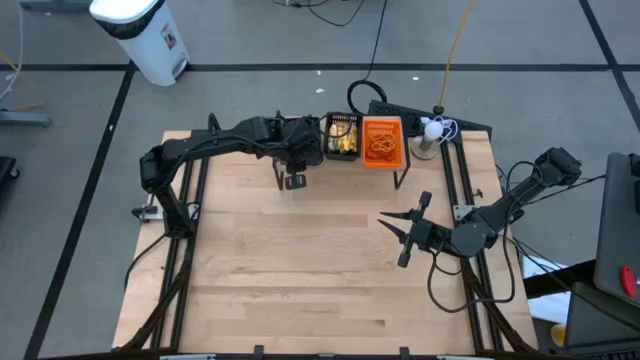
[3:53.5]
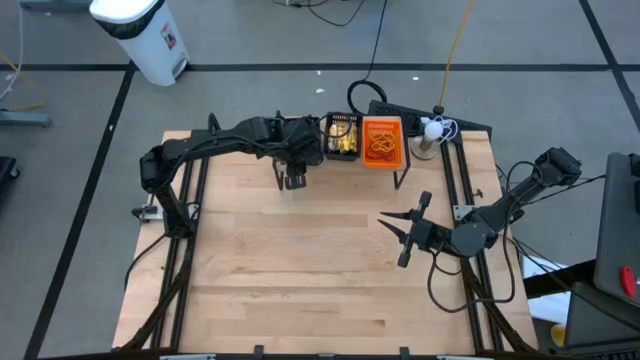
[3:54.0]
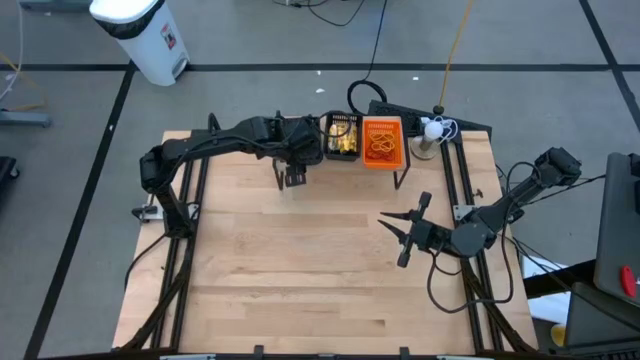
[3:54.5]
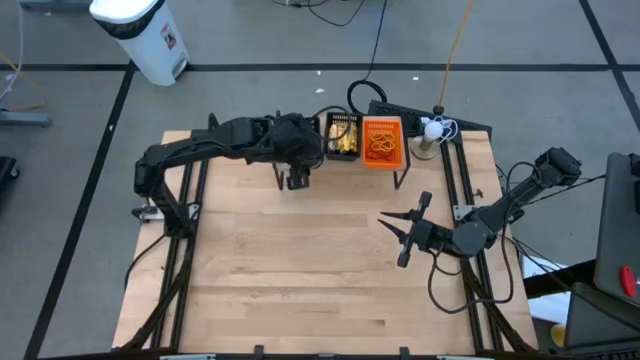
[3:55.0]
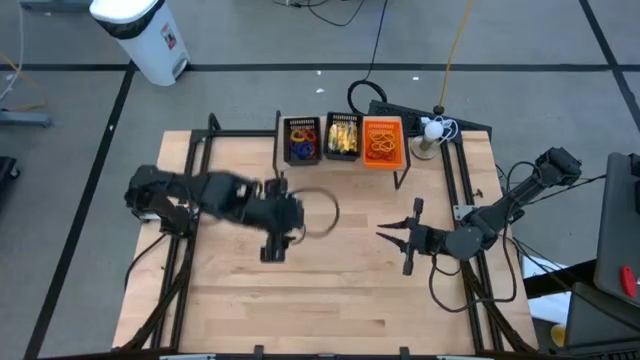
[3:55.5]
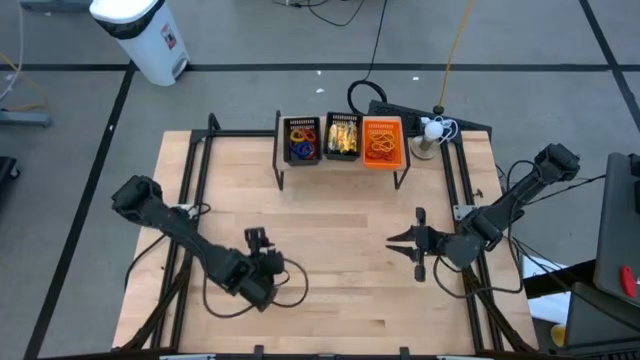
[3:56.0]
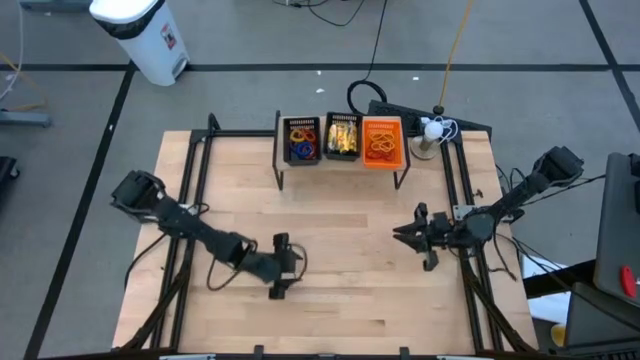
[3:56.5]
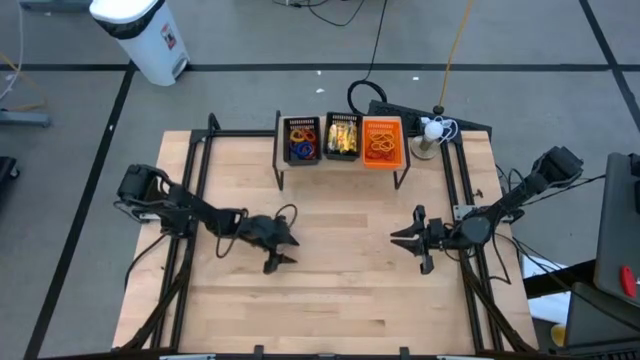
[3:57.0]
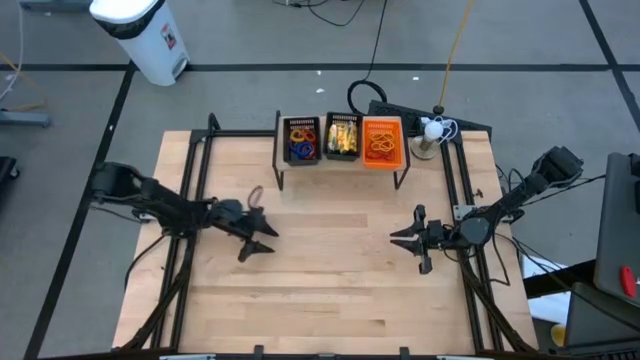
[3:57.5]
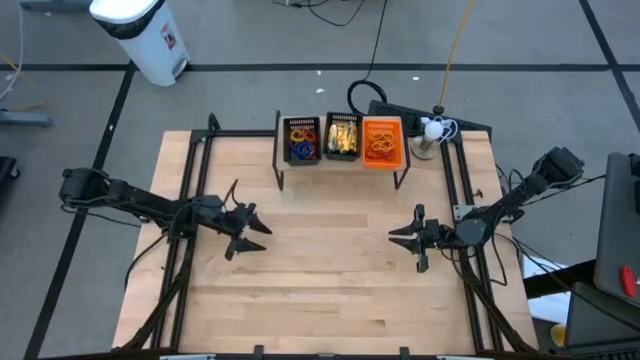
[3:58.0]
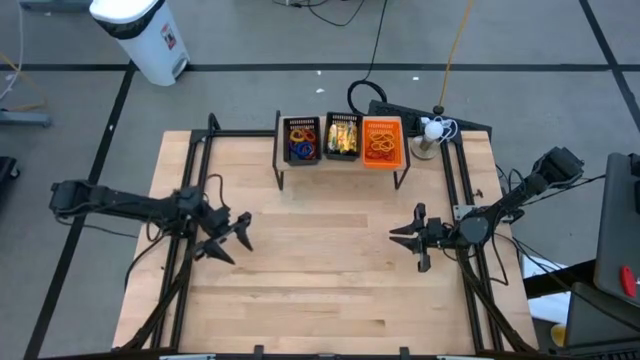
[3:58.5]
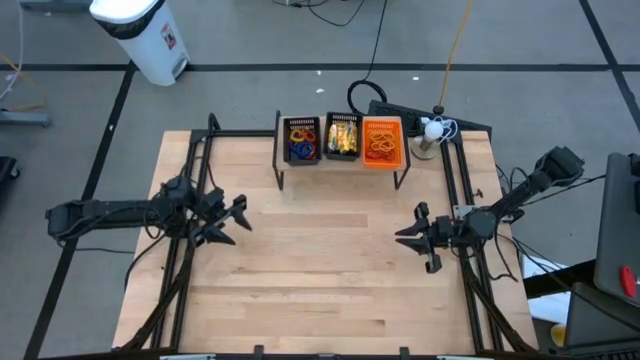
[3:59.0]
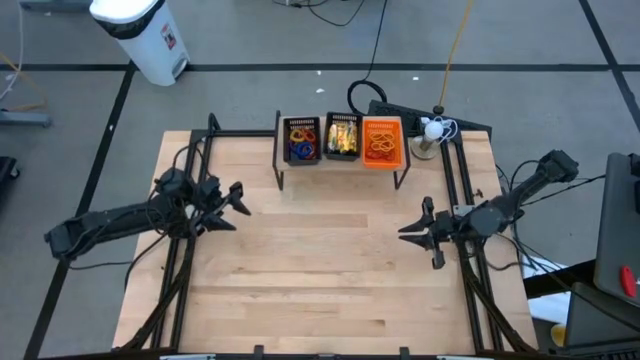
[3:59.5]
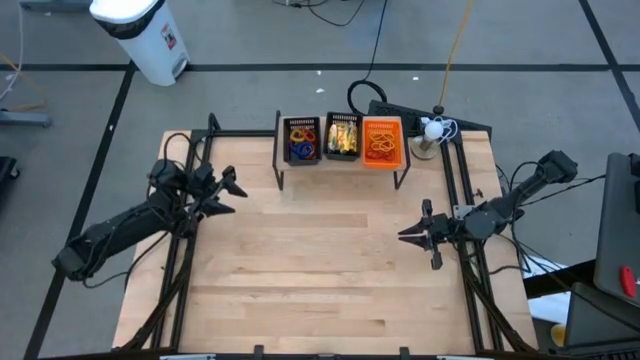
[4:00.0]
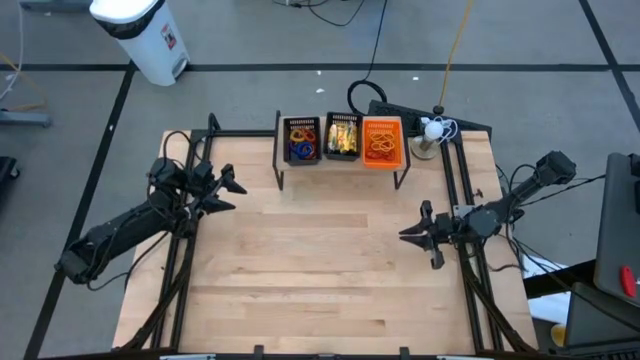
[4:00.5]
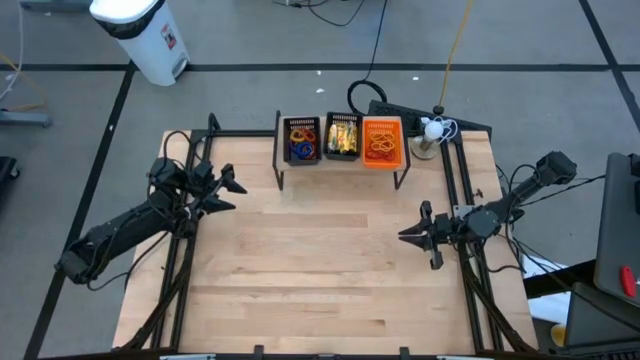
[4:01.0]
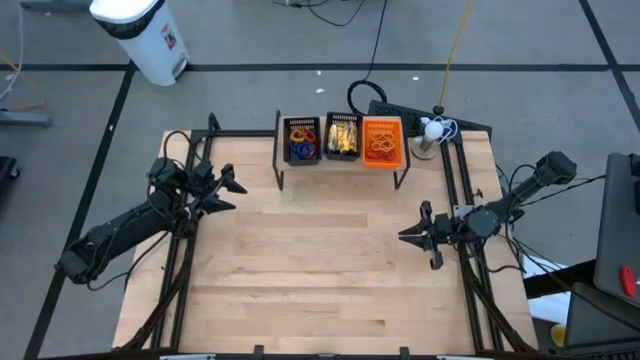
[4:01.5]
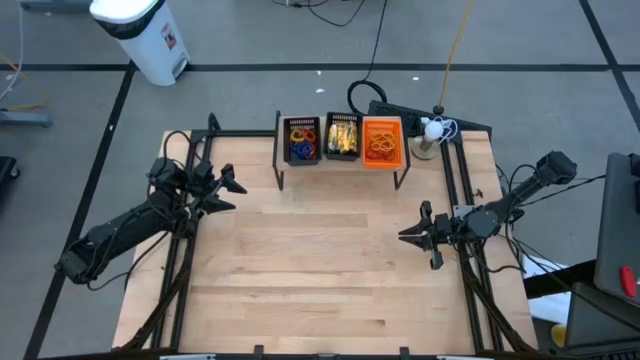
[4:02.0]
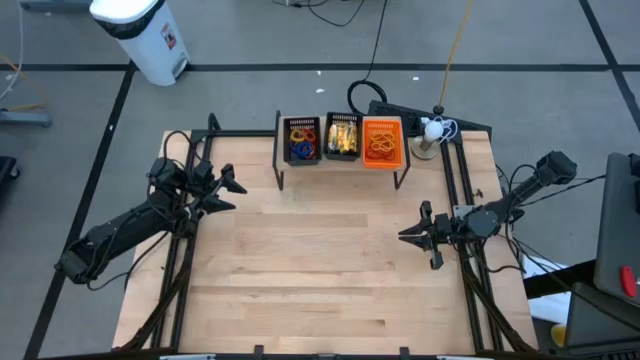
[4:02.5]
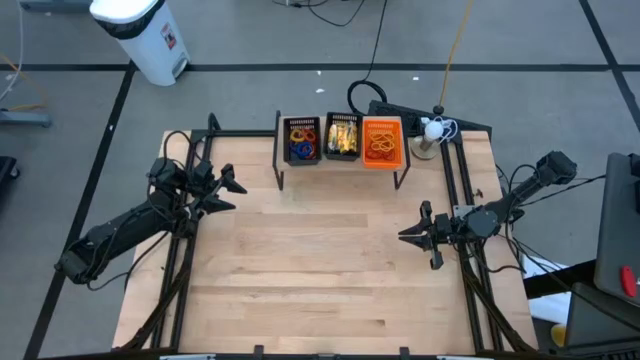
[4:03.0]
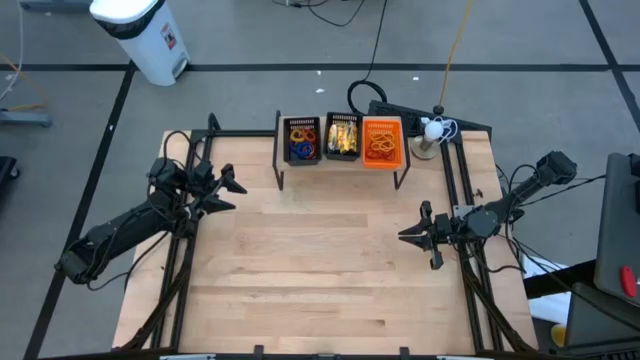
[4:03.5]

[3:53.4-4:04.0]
Task: Pick & Place Office Desk Supplies
Return to Home Position

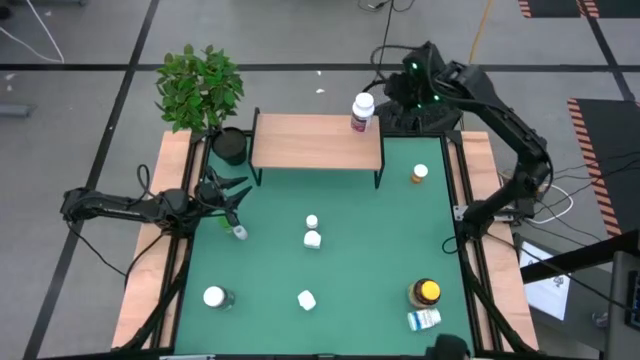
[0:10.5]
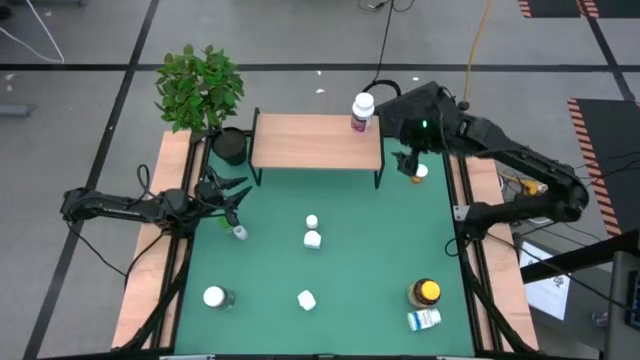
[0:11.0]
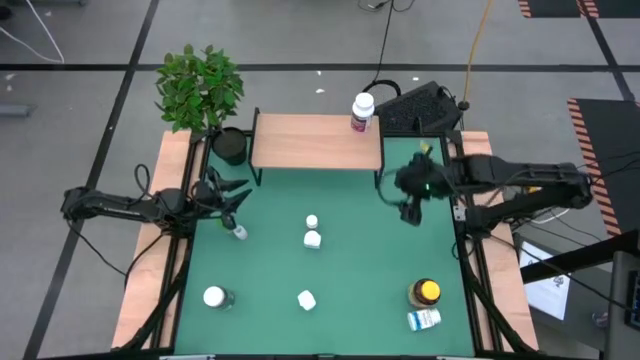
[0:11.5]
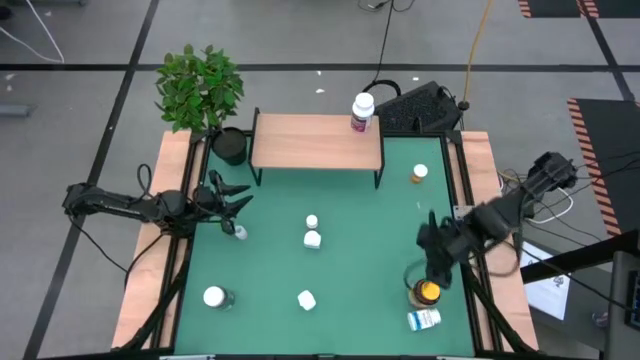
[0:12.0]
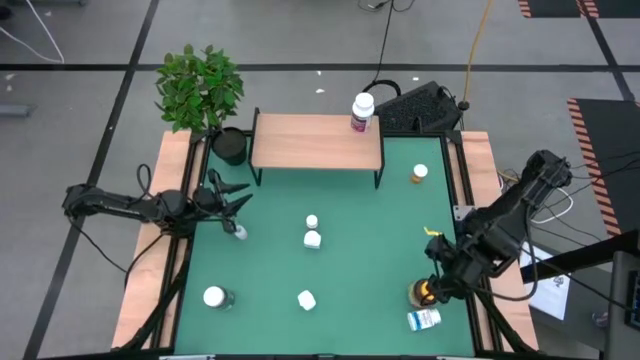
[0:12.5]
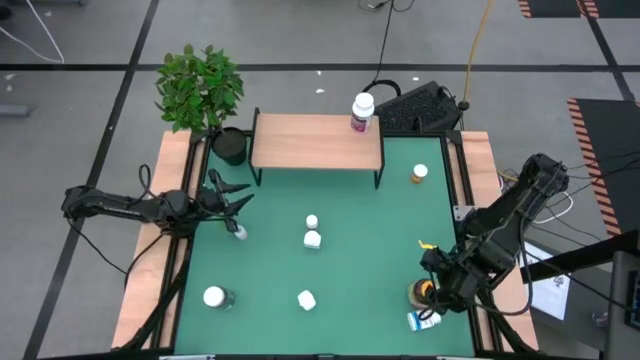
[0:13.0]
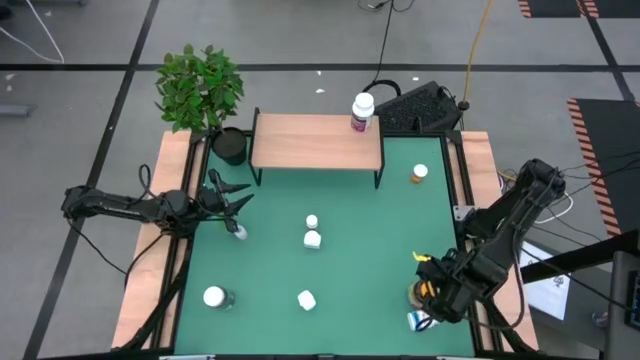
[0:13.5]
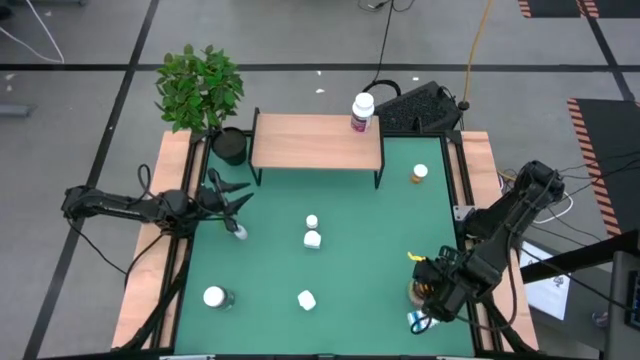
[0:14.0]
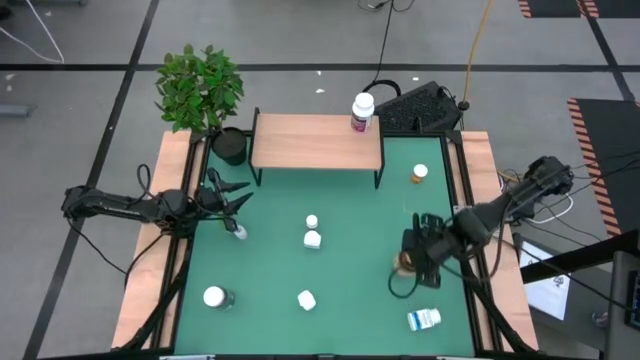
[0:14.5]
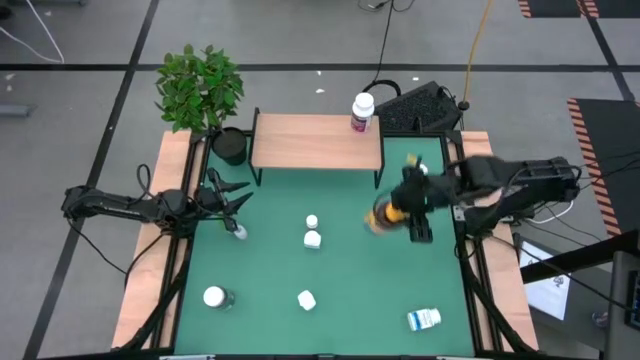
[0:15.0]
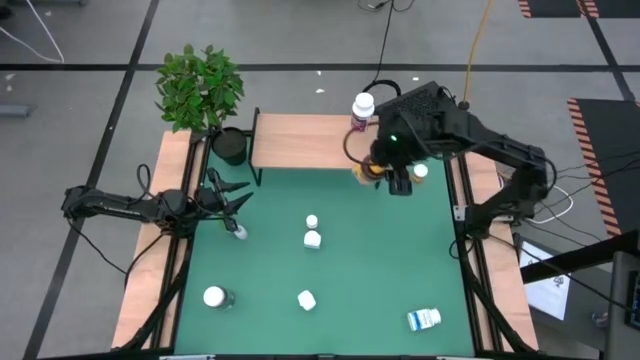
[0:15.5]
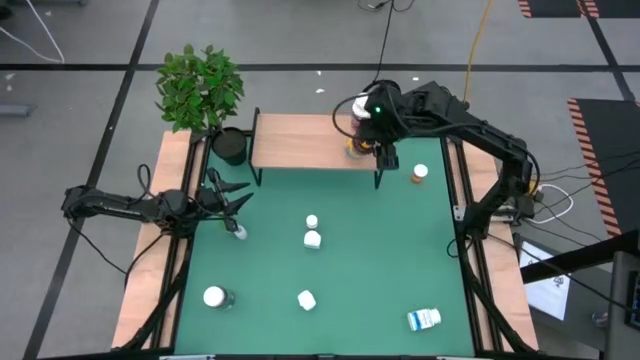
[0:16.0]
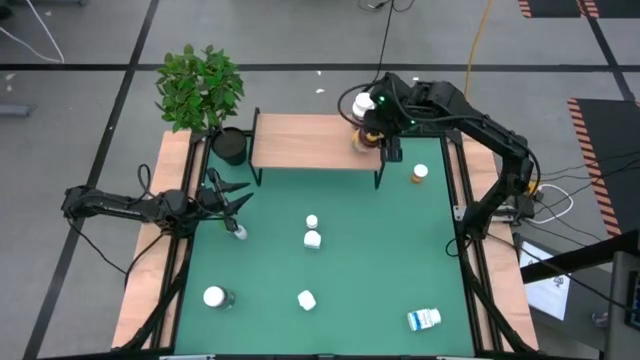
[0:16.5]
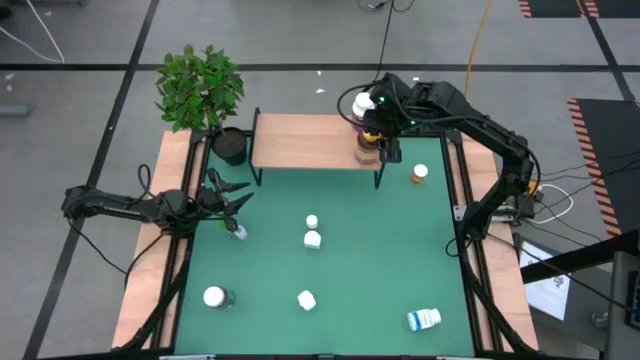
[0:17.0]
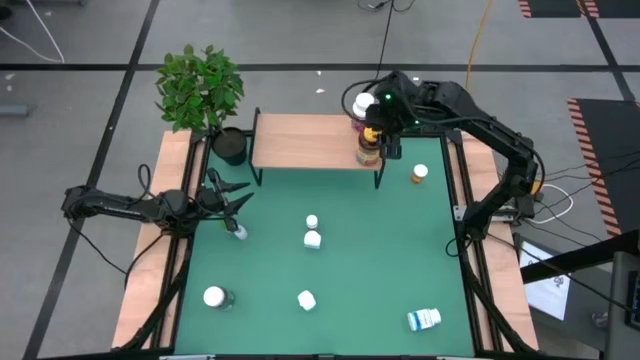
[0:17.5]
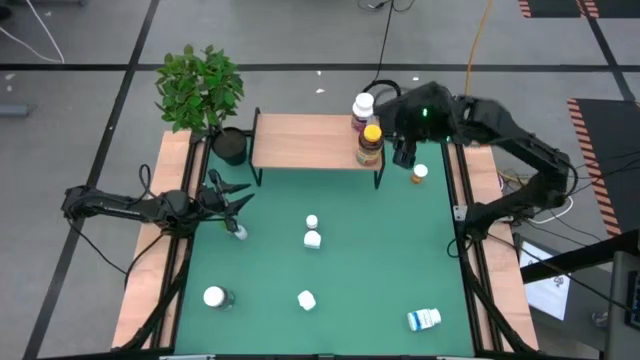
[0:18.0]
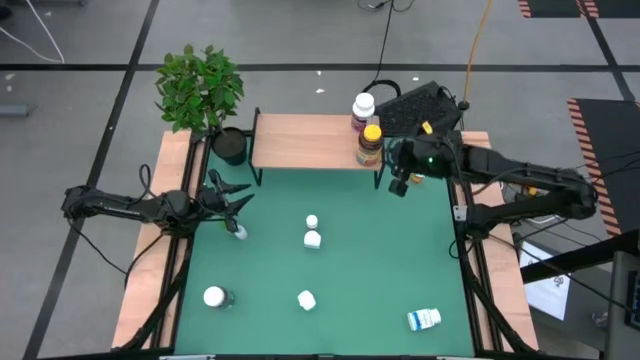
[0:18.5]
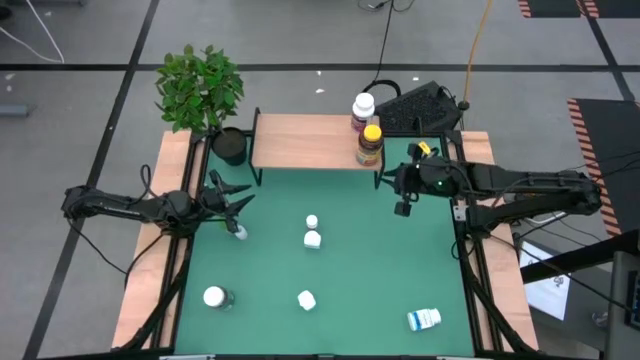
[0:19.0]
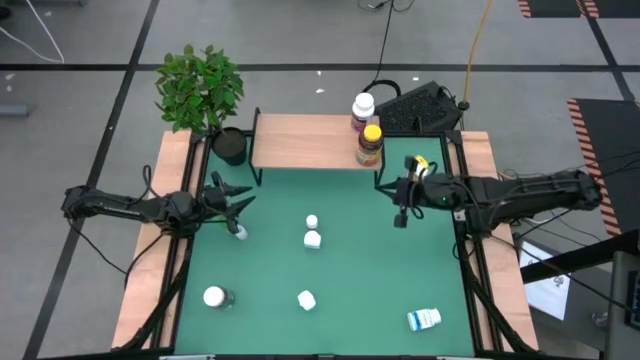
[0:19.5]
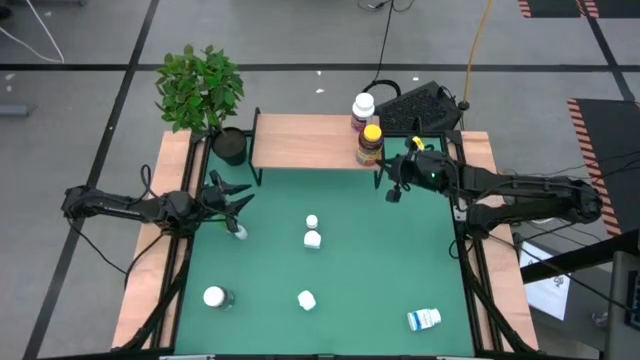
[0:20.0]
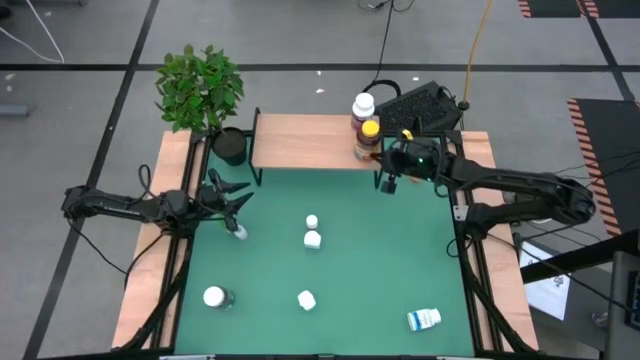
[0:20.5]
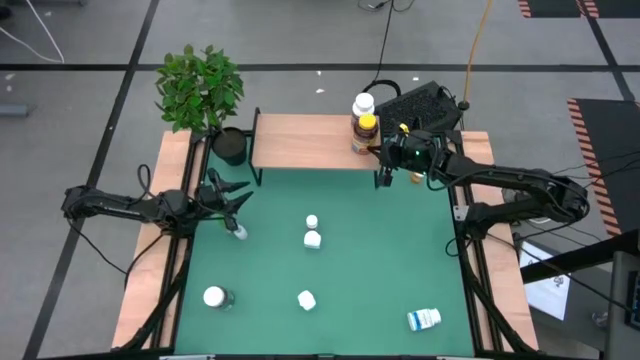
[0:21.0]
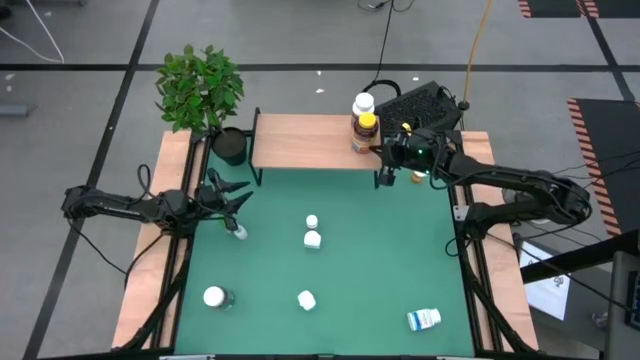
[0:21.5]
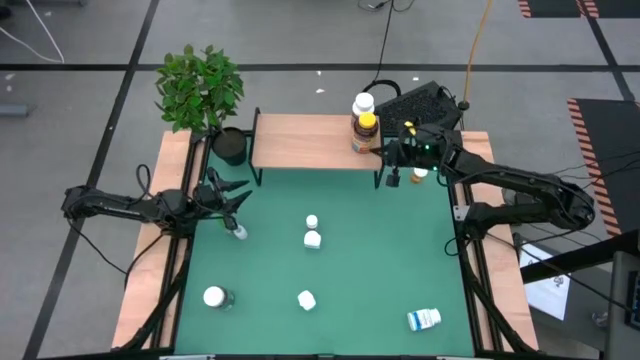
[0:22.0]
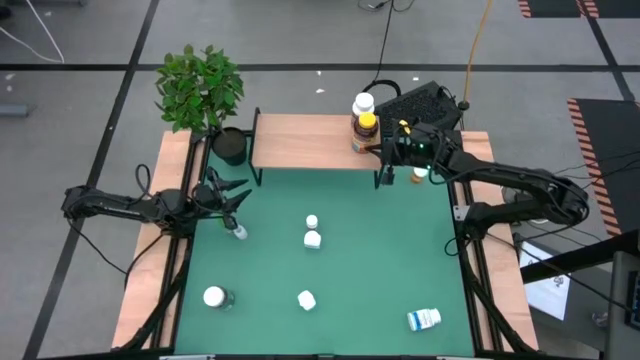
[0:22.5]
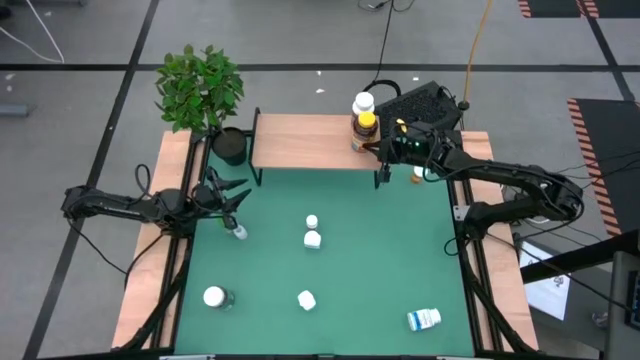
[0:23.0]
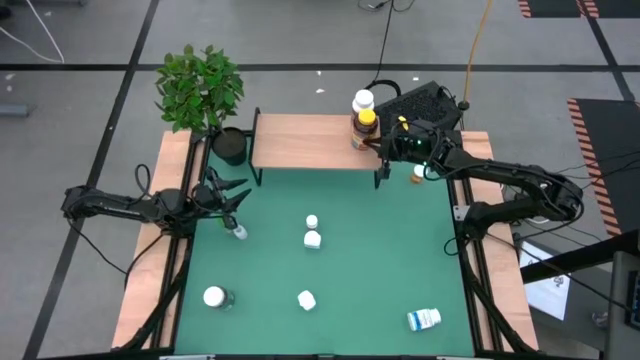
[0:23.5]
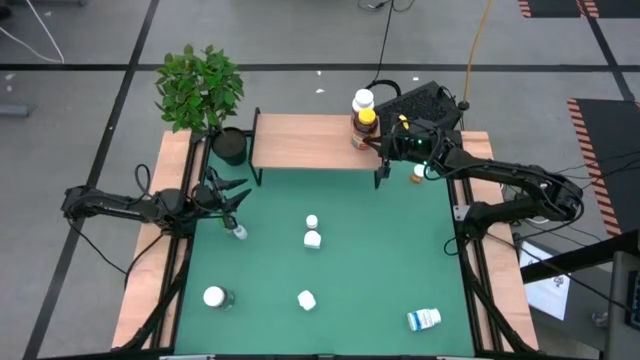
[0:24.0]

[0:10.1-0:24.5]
Task: Pick and place medicine bottles onto shelf by color
Put the yellow pill bottle on the shelf
